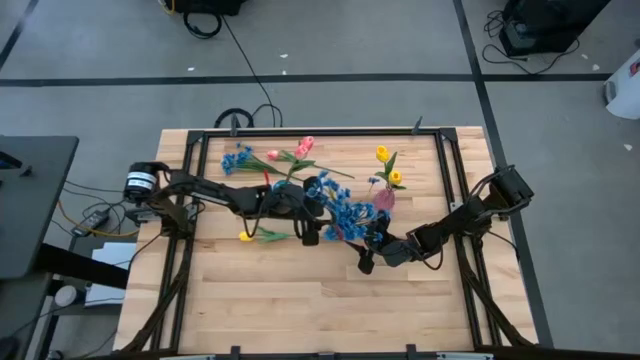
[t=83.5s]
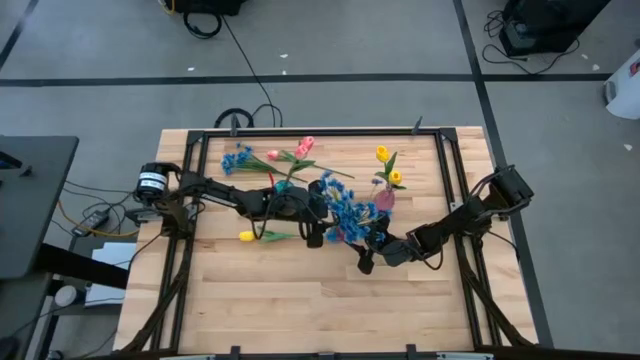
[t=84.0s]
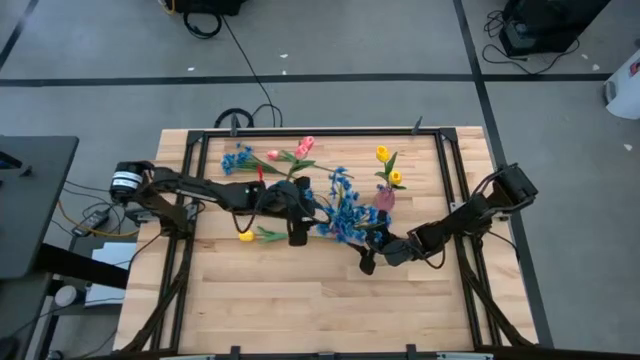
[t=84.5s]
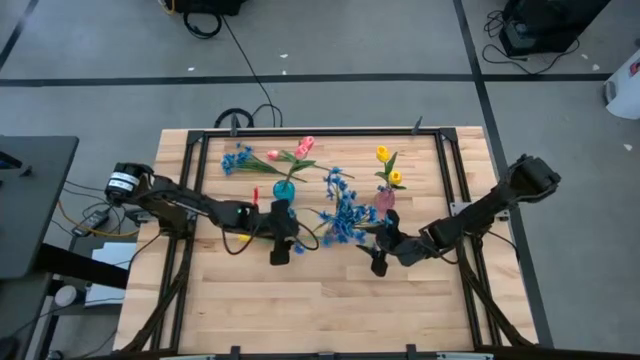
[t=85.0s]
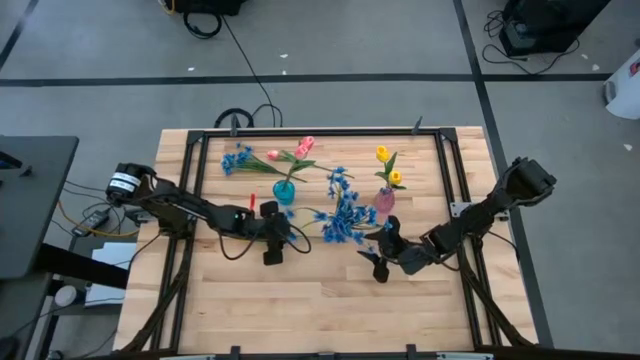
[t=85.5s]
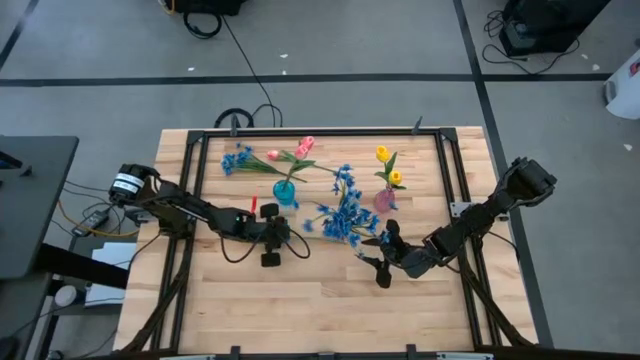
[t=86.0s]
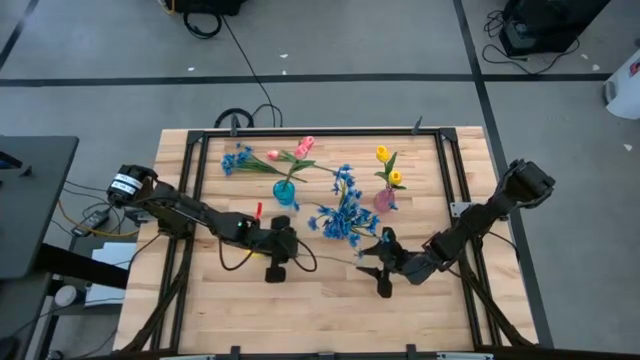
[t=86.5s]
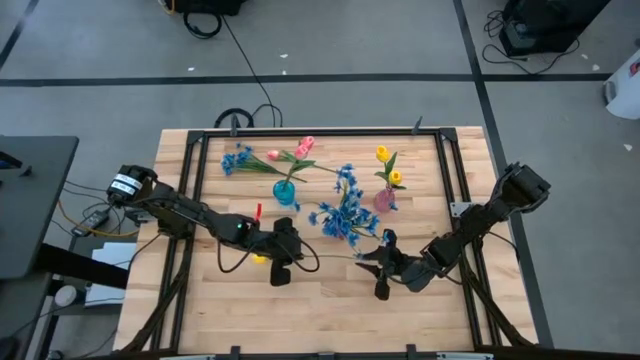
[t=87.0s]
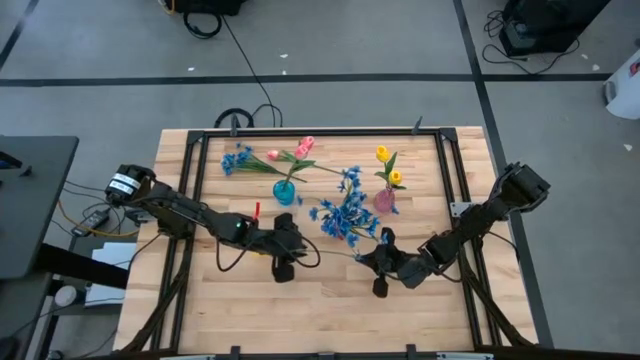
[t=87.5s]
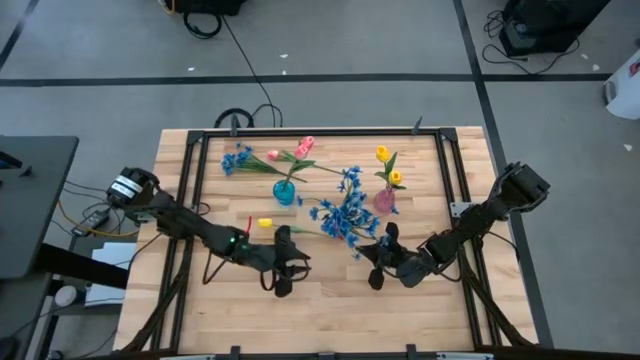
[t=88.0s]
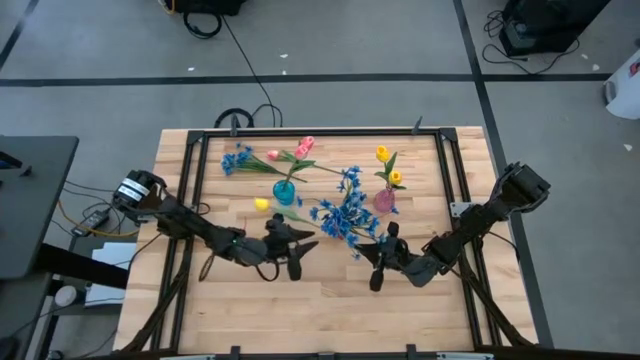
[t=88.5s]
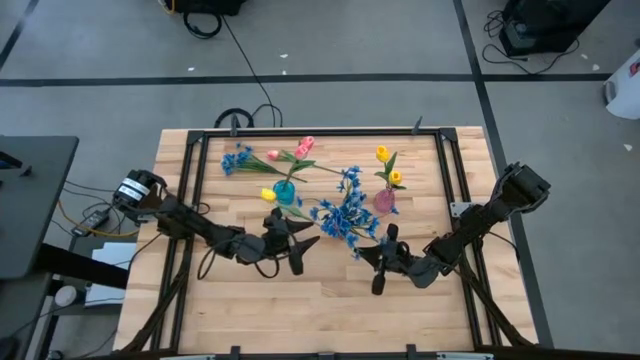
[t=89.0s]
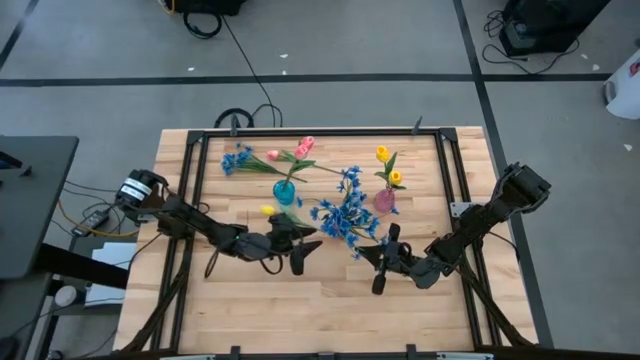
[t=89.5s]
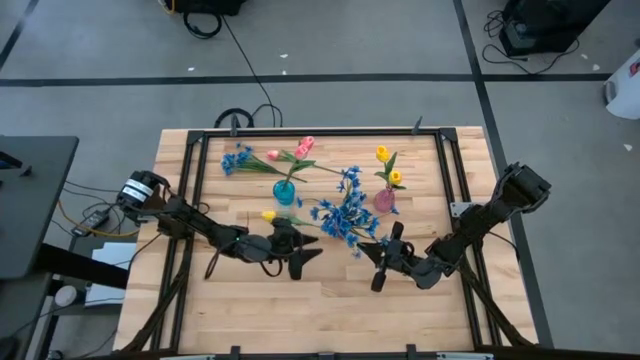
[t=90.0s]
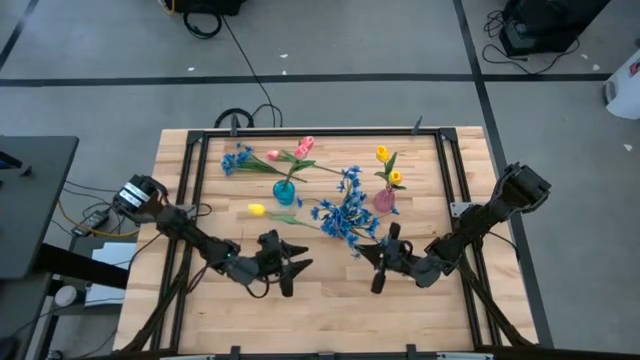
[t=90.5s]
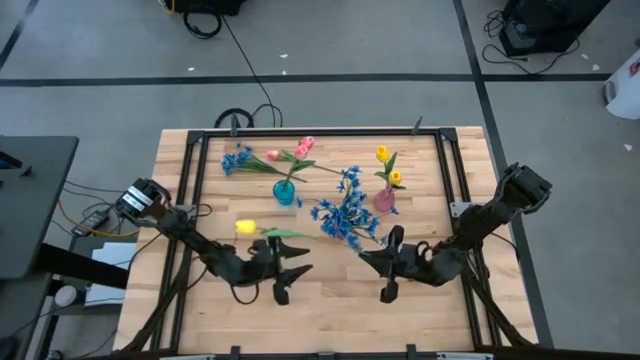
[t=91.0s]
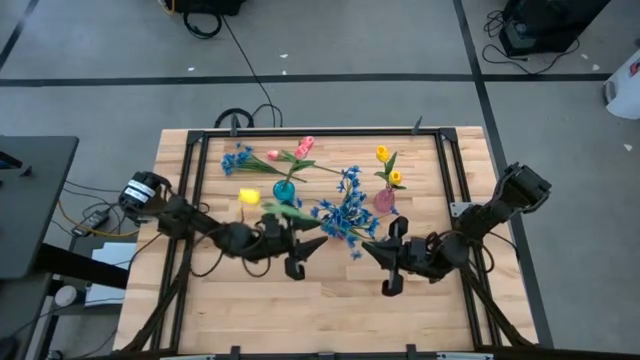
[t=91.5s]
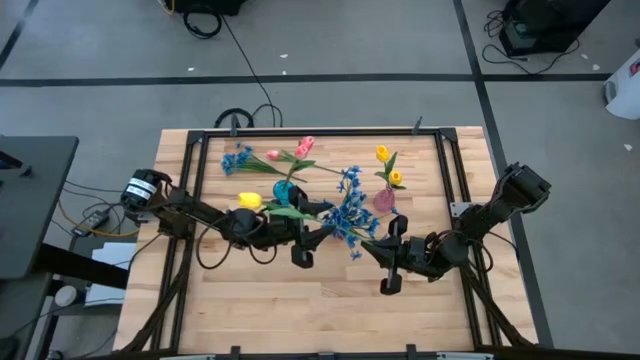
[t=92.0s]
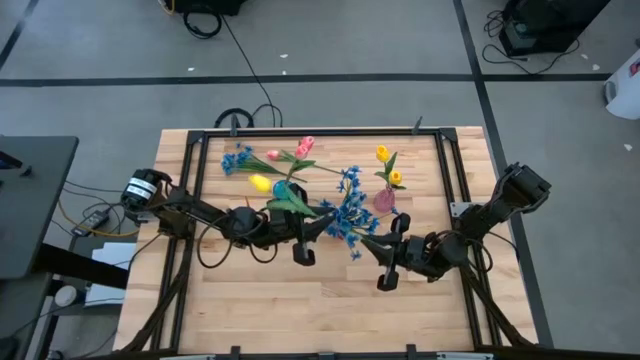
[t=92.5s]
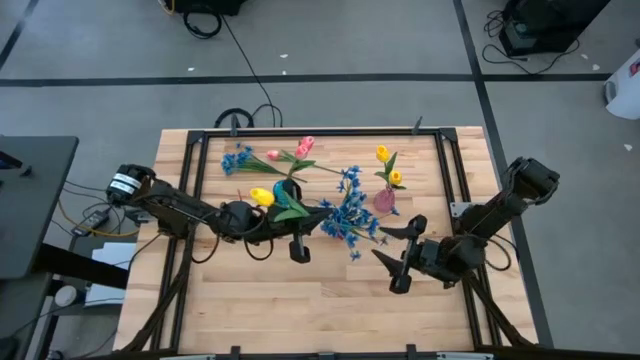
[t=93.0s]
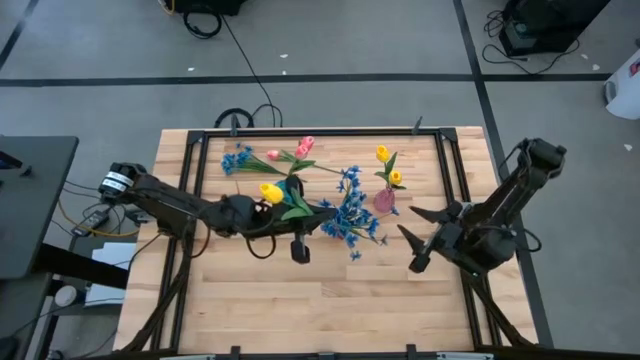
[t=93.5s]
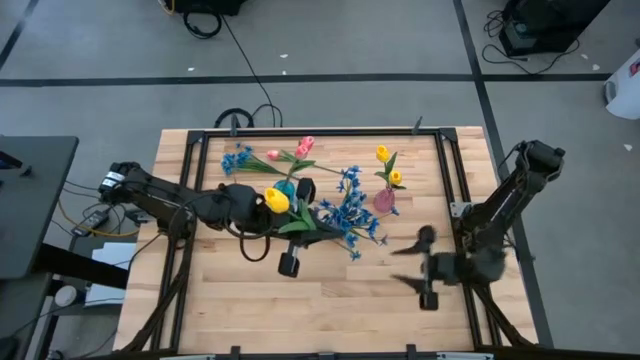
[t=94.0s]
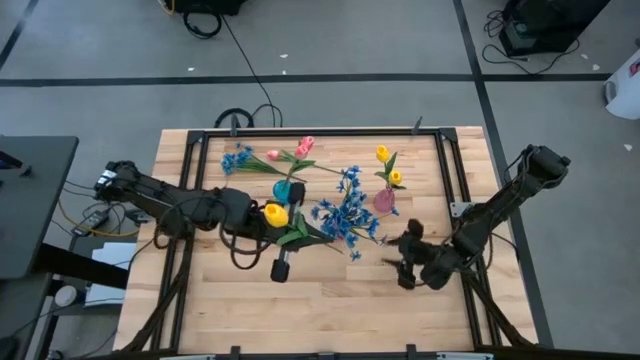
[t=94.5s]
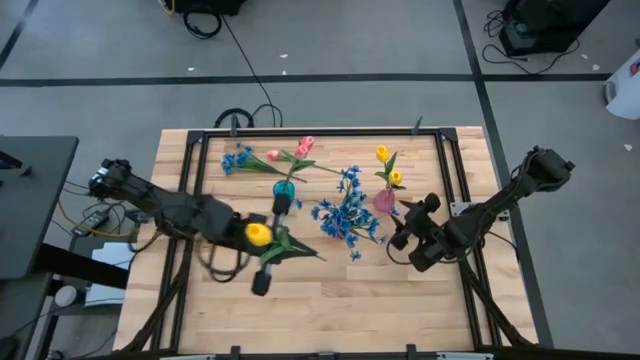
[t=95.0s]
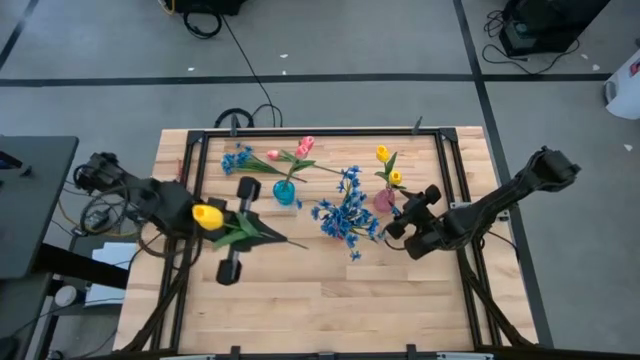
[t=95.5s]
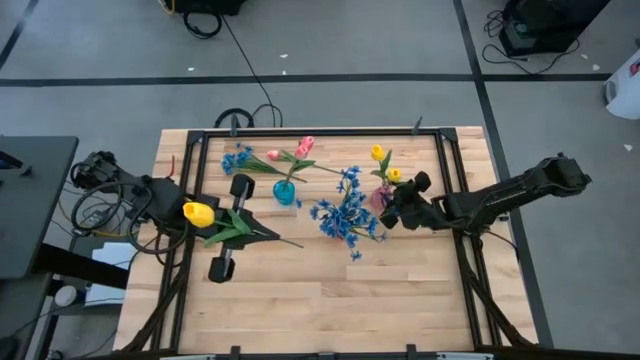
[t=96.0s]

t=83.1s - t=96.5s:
Task: Sort flowers into vase by color
Put the yellow flower into the pink vase

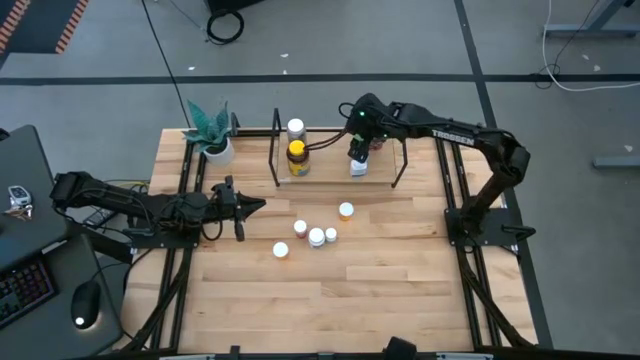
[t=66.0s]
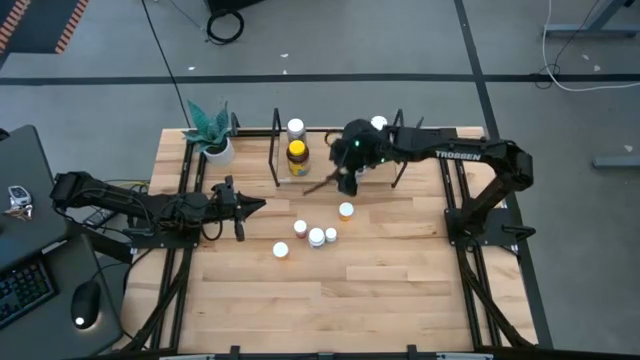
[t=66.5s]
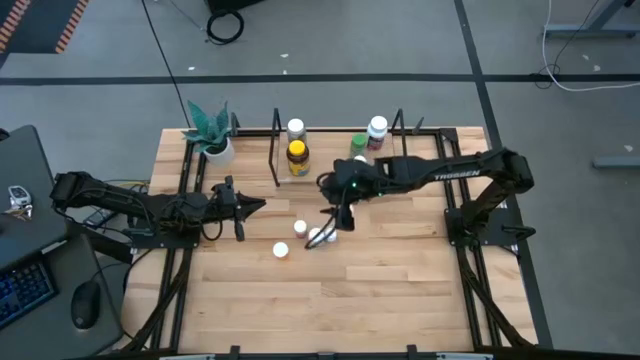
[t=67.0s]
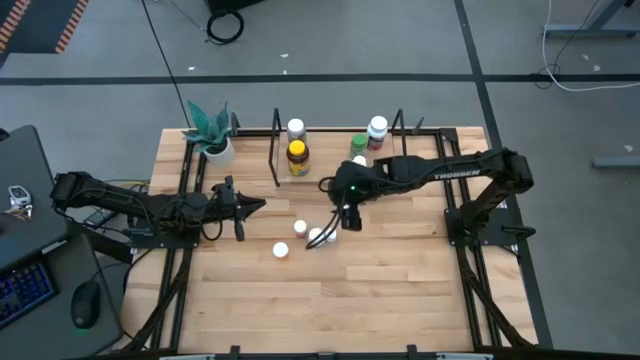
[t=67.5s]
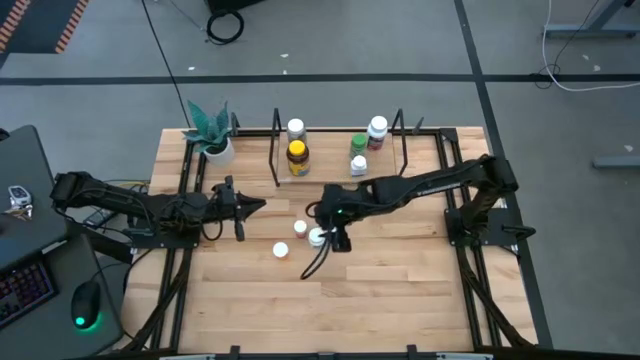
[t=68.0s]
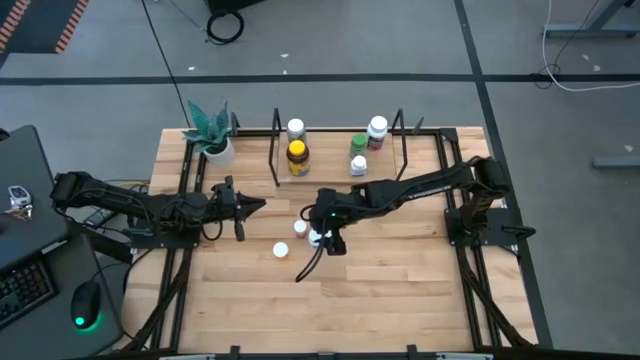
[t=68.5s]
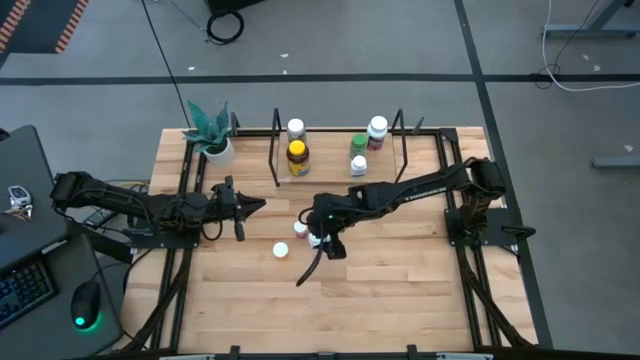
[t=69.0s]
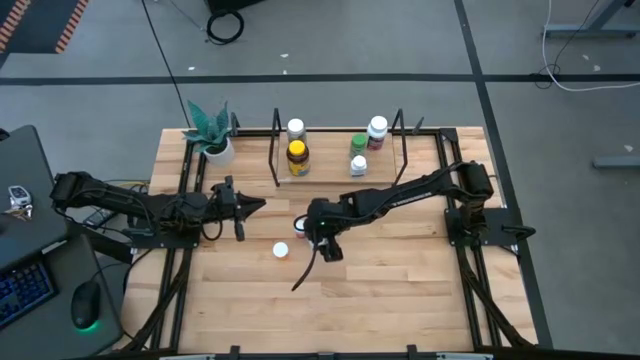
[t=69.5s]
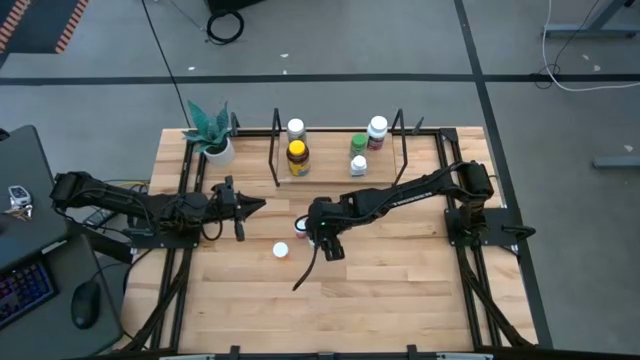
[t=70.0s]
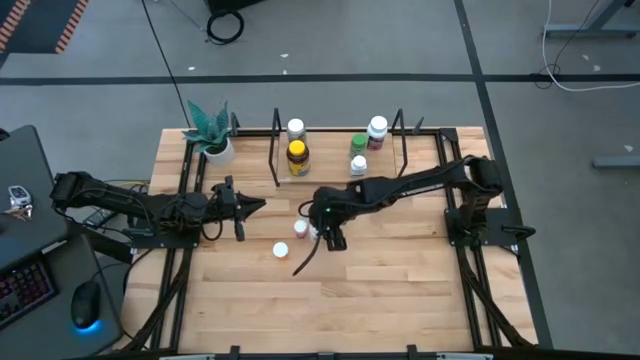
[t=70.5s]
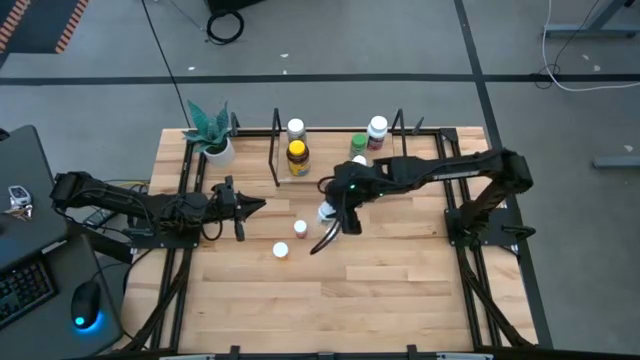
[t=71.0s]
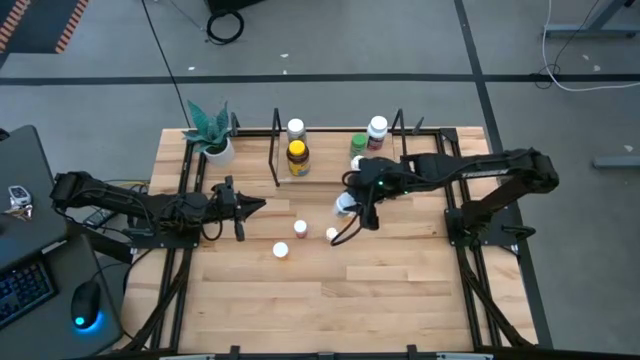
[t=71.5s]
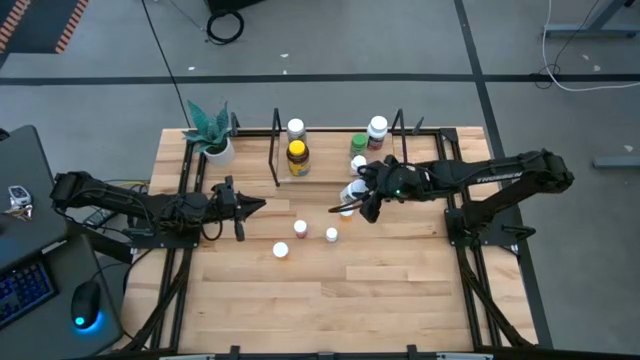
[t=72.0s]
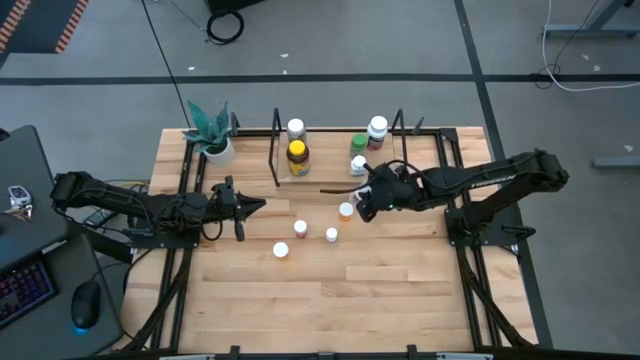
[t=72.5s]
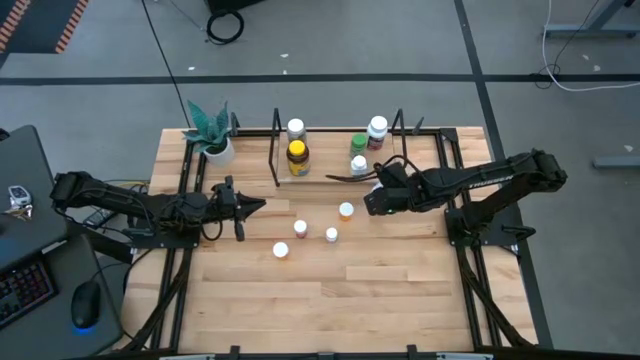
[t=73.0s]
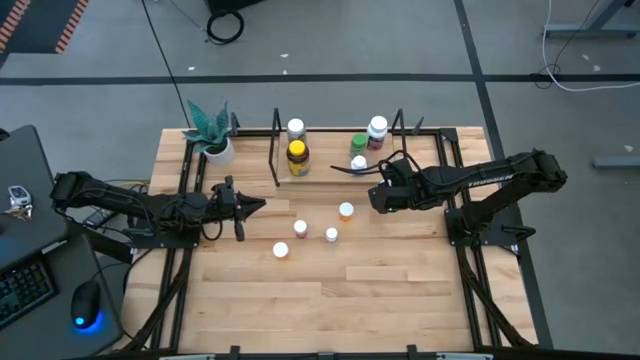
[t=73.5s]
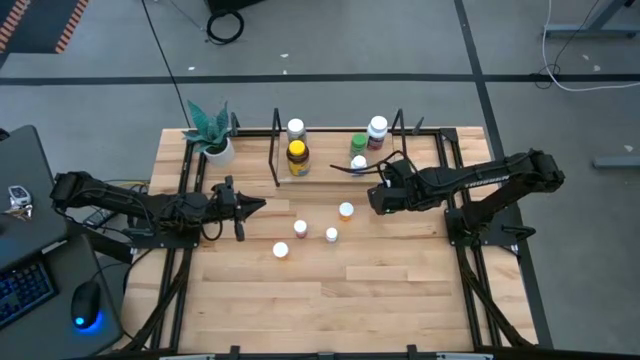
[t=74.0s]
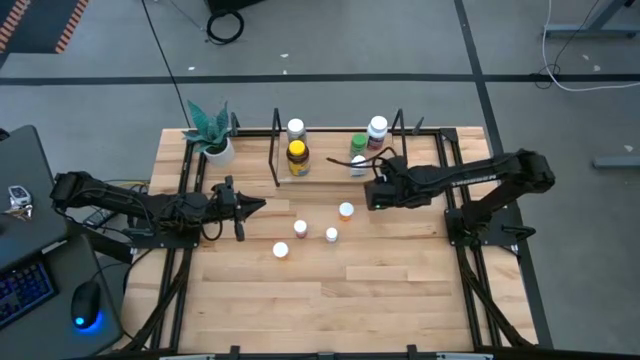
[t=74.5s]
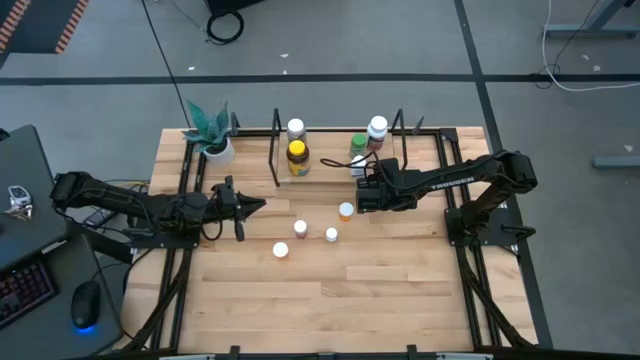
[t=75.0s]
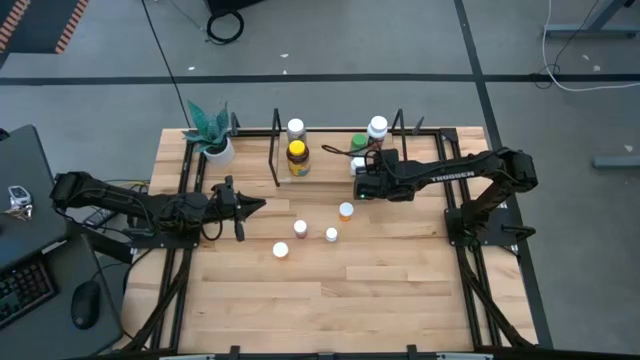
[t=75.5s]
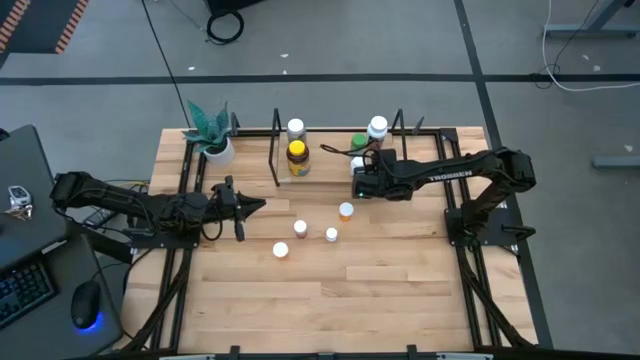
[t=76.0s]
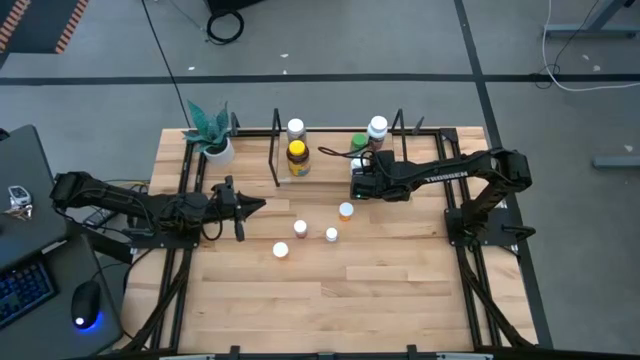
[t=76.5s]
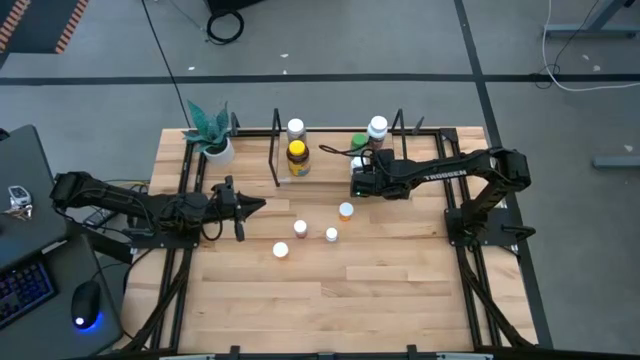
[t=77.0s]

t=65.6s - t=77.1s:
Task: Pick and place medicine bottles onto shelf by color
Put the small white and green medicine bottle on the shelf
